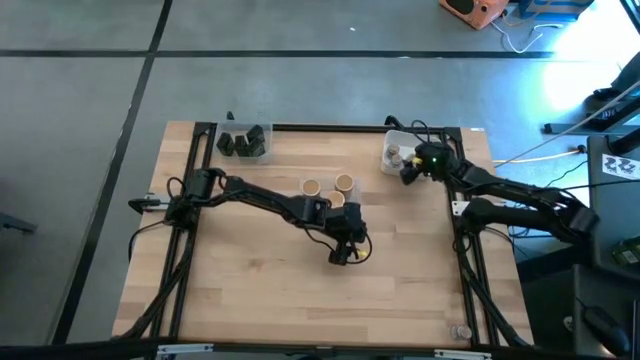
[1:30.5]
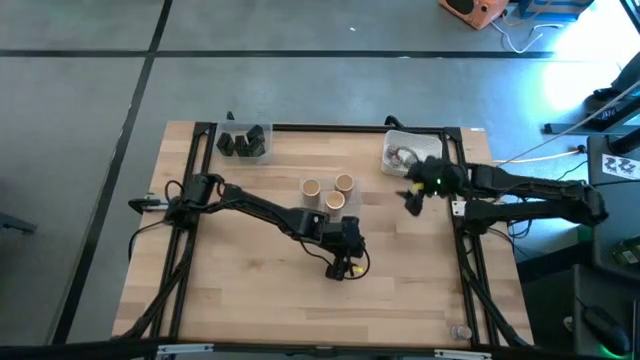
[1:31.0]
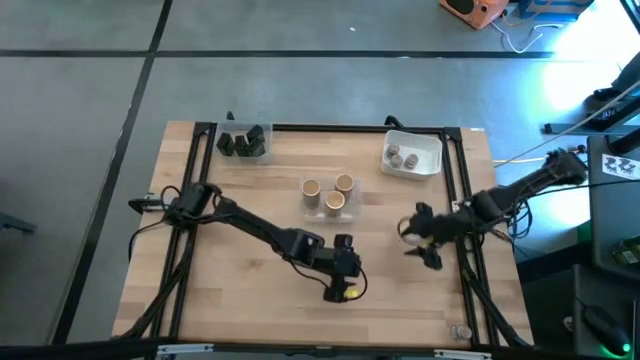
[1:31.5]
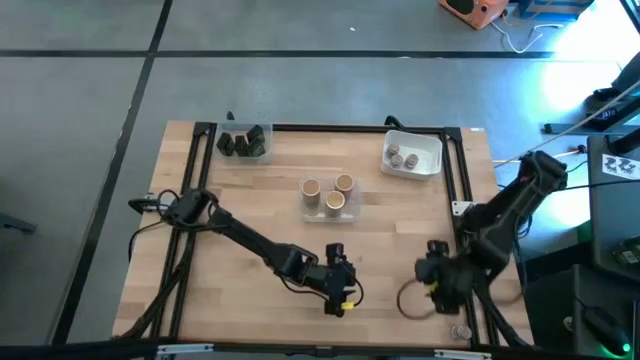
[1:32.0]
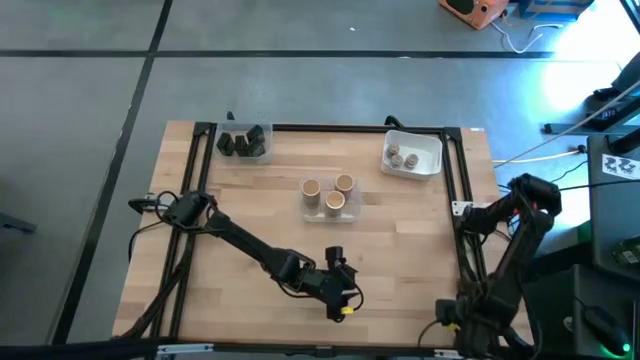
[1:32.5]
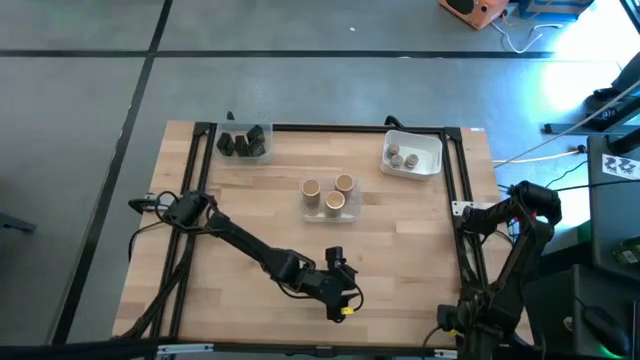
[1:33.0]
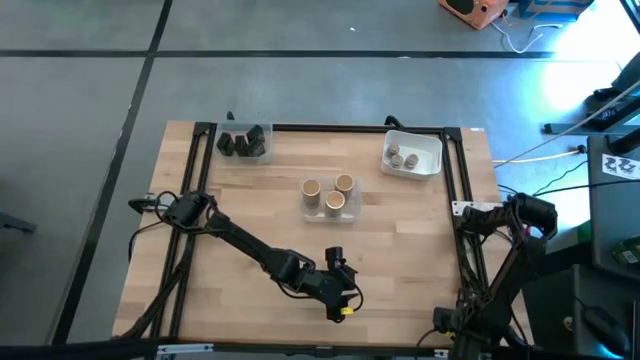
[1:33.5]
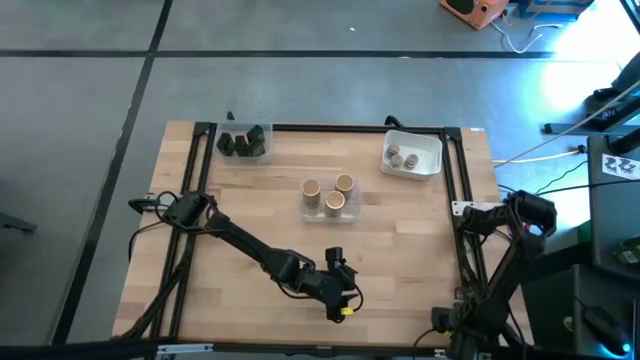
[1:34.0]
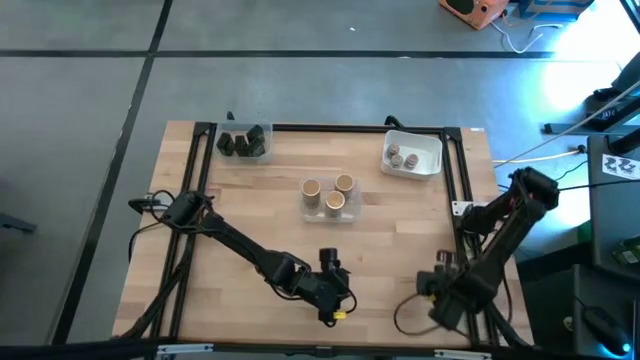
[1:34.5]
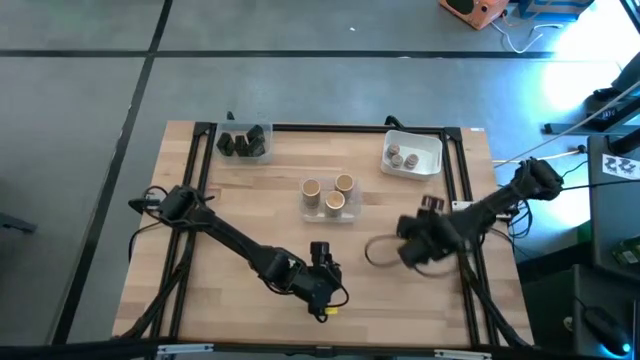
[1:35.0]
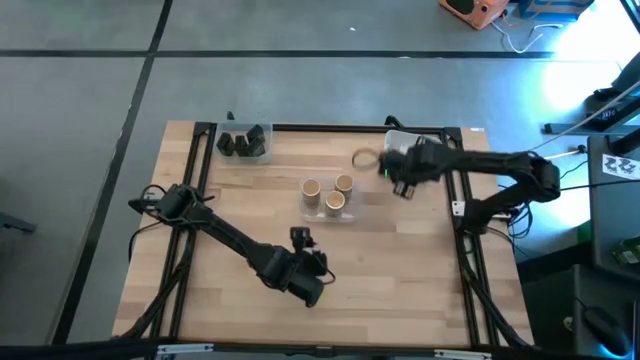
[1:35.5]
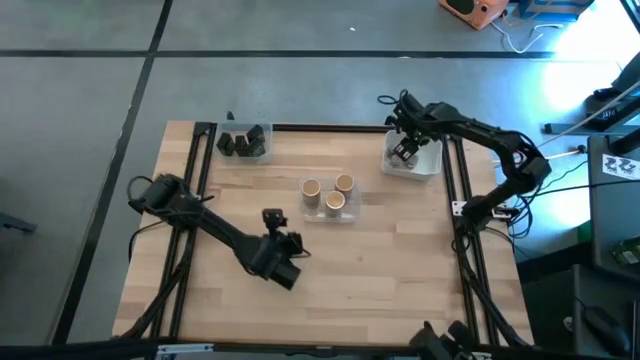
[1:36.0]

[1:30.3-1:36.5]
Task: Sort spices by type
Put the brown seasoning bottle into the white bin

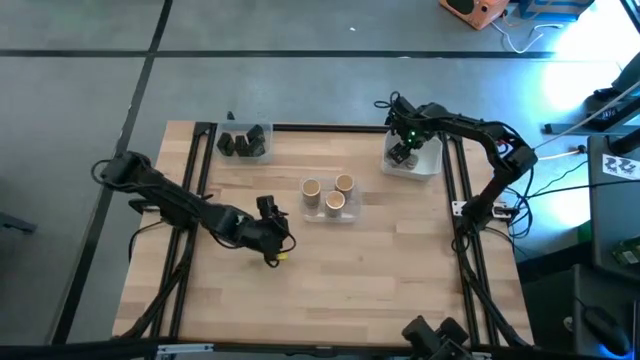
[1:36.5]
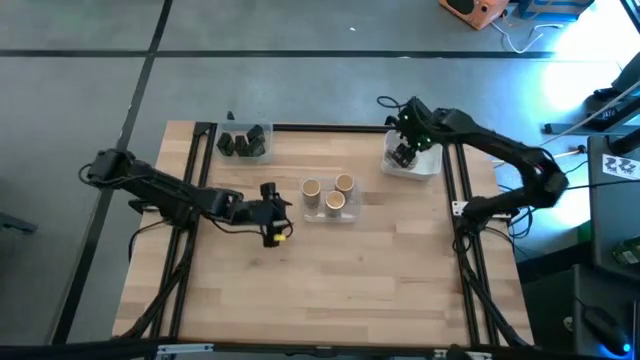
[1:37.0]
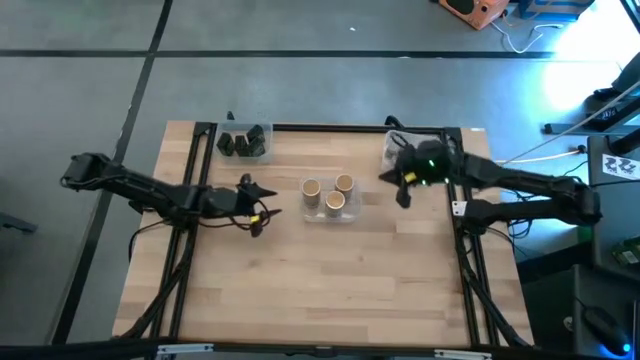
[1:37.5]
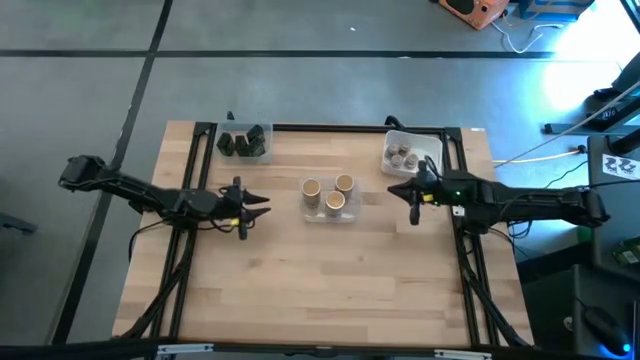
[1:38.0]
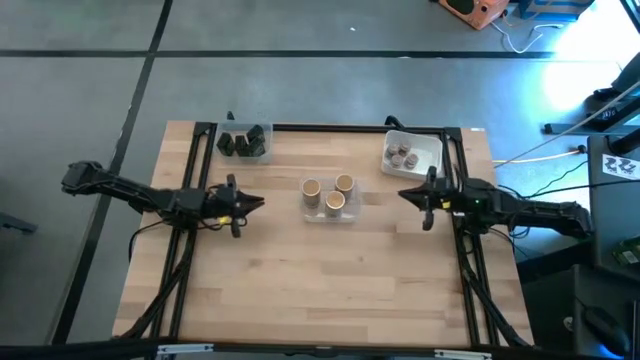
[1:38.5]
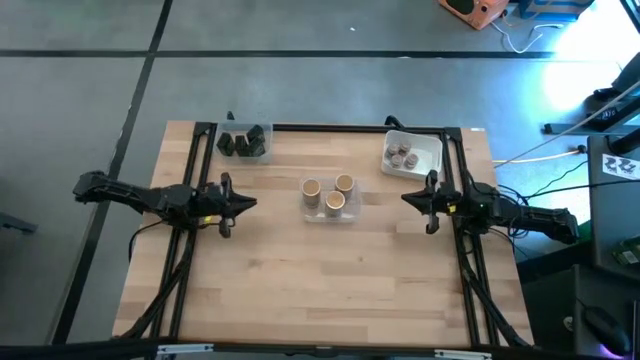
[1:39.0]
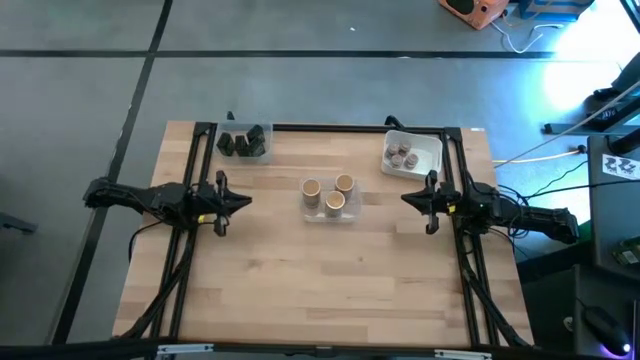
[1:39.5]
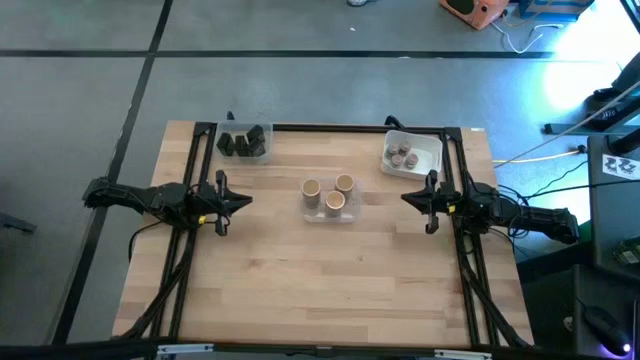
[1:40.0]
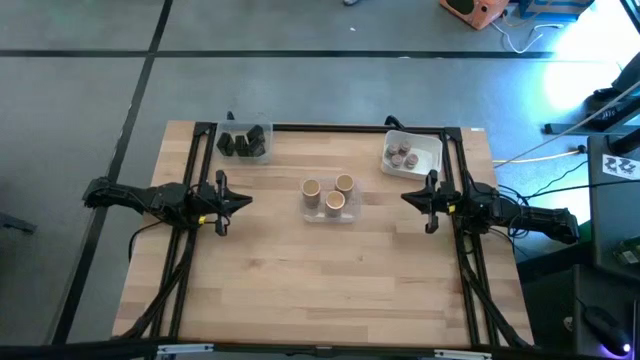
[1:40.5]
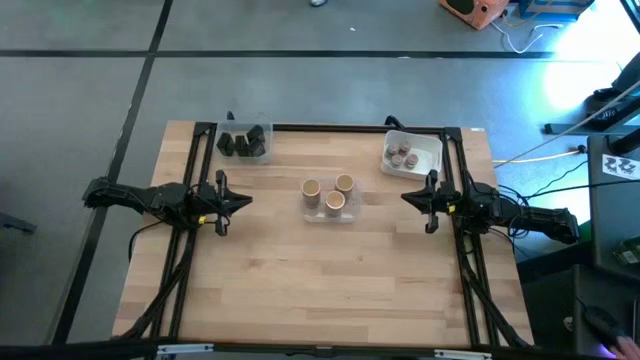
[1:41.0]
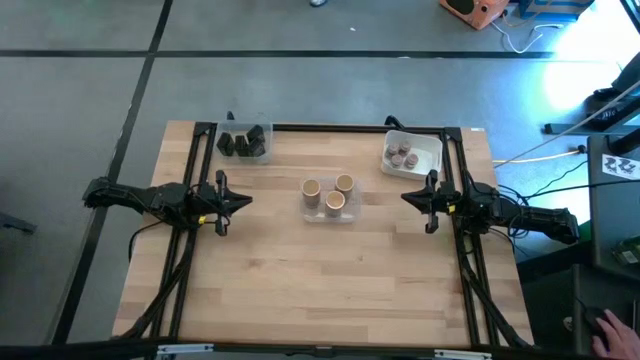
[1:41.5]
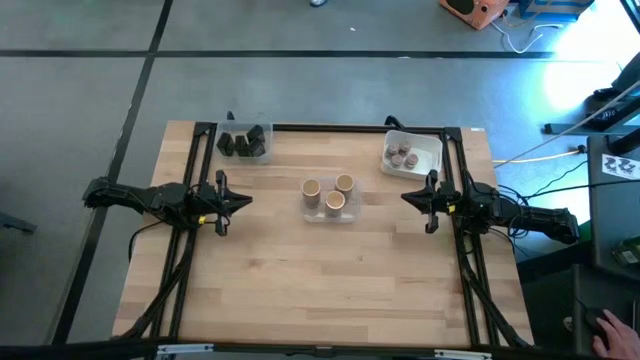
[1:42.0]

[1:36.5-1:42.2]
Return to Home Position

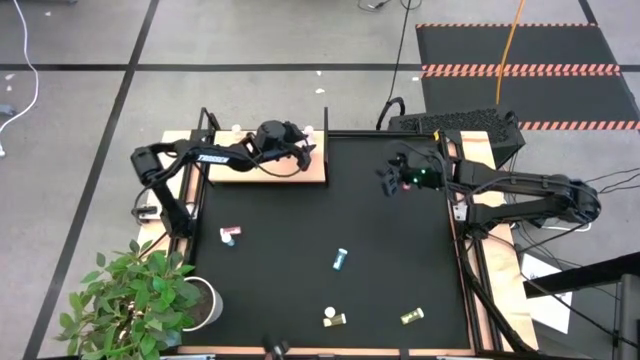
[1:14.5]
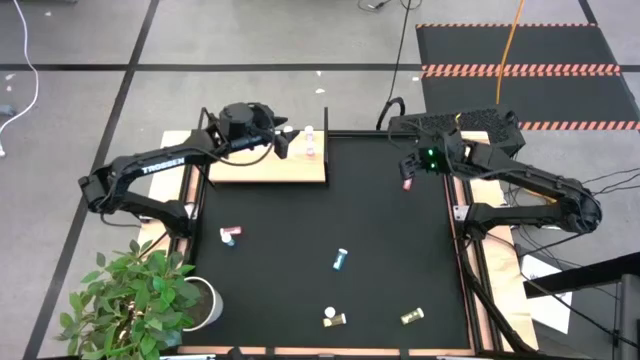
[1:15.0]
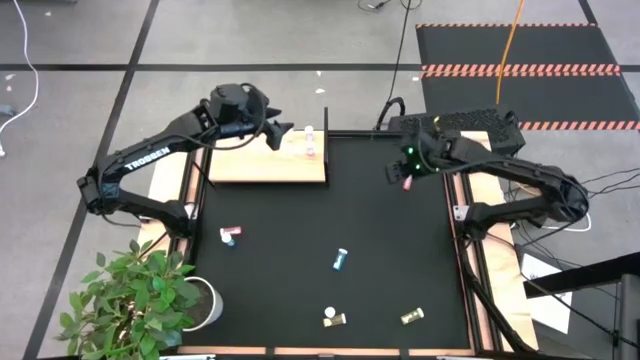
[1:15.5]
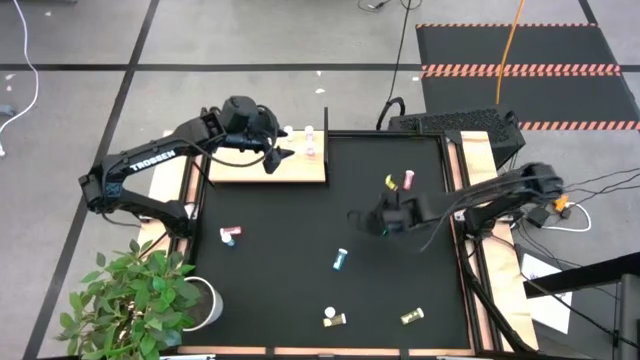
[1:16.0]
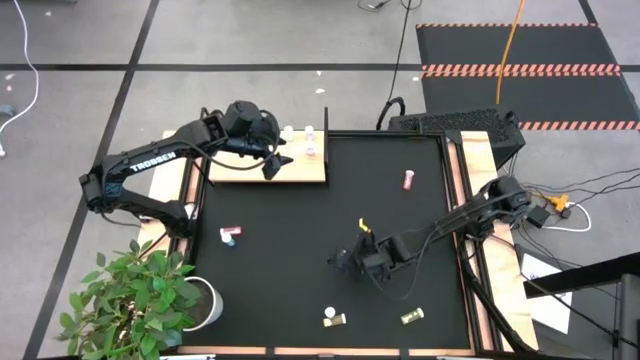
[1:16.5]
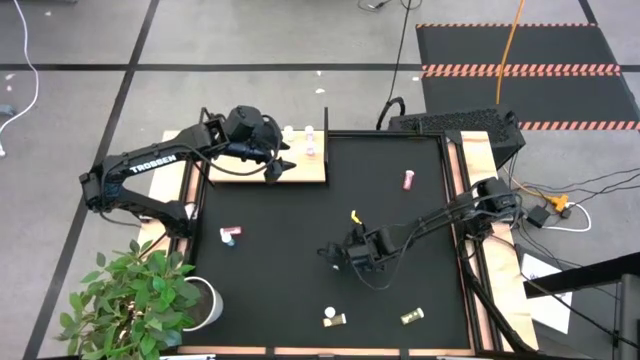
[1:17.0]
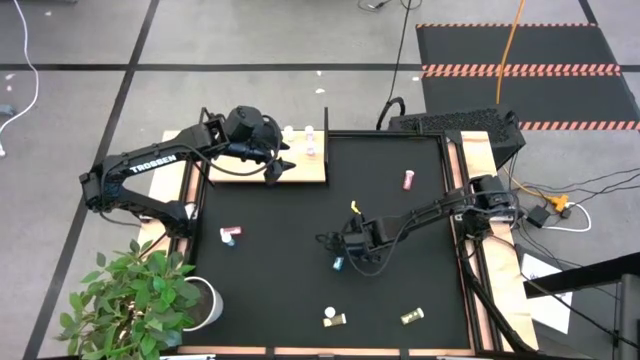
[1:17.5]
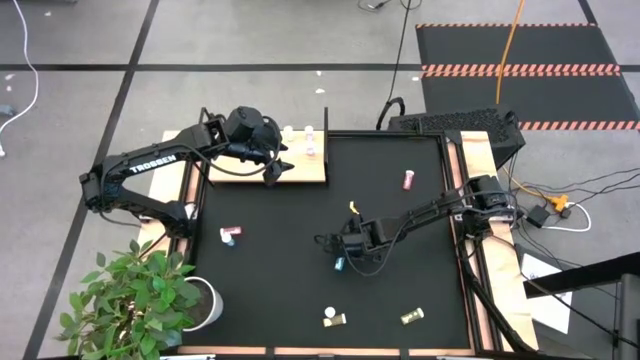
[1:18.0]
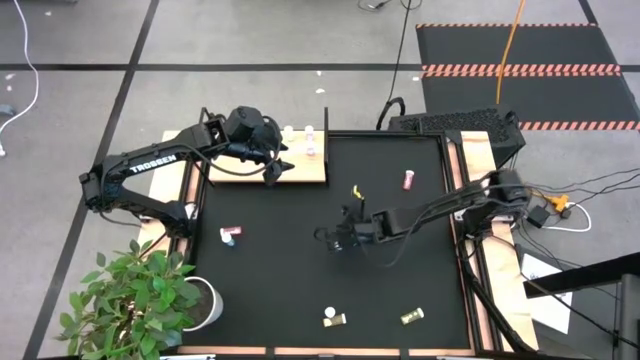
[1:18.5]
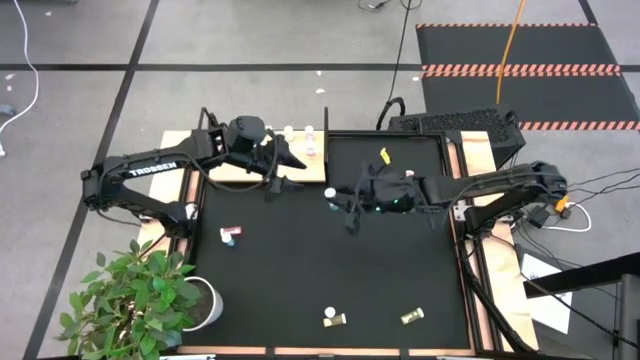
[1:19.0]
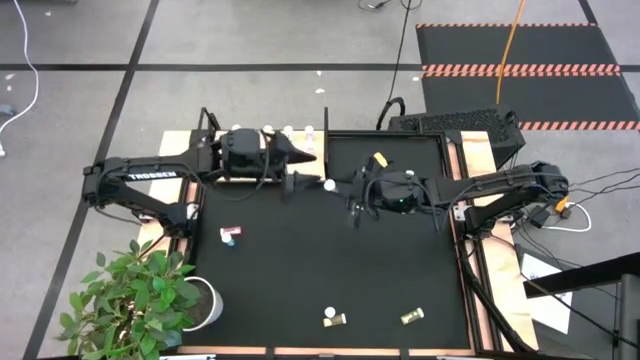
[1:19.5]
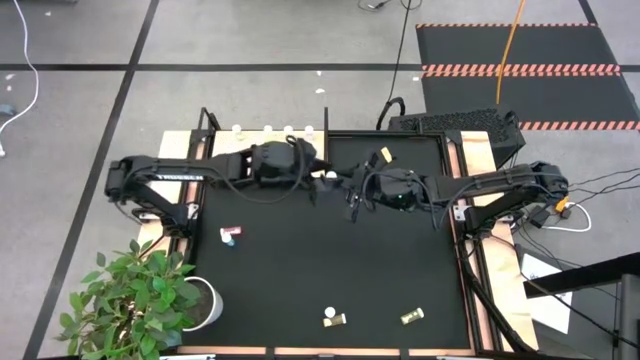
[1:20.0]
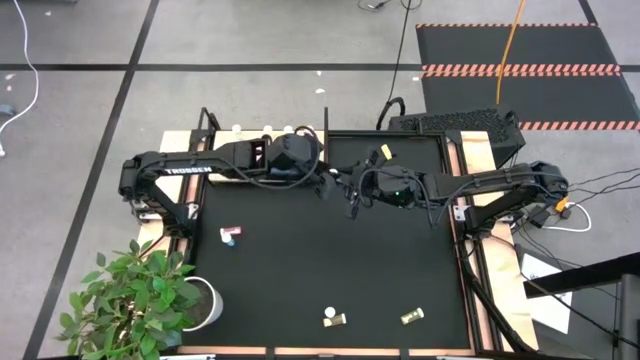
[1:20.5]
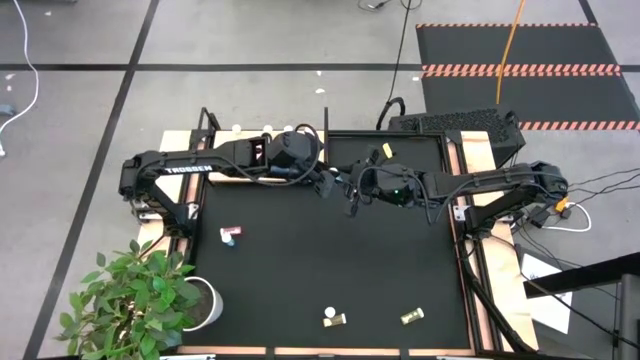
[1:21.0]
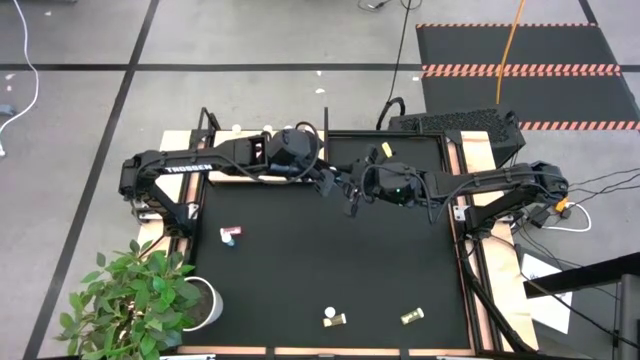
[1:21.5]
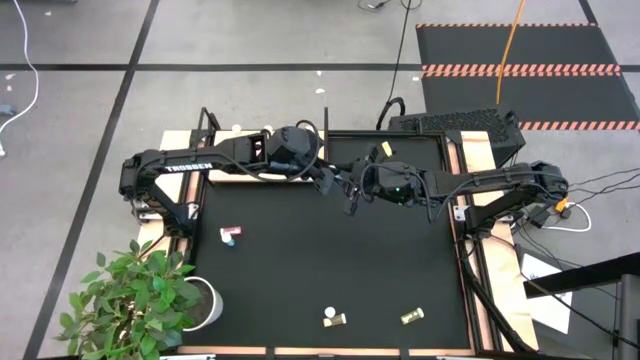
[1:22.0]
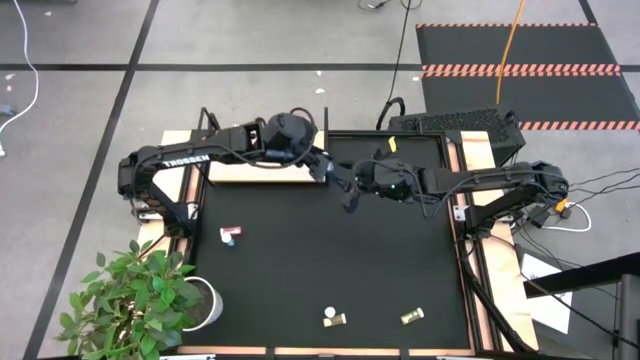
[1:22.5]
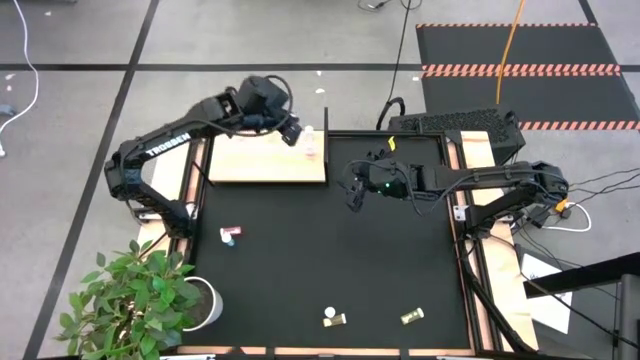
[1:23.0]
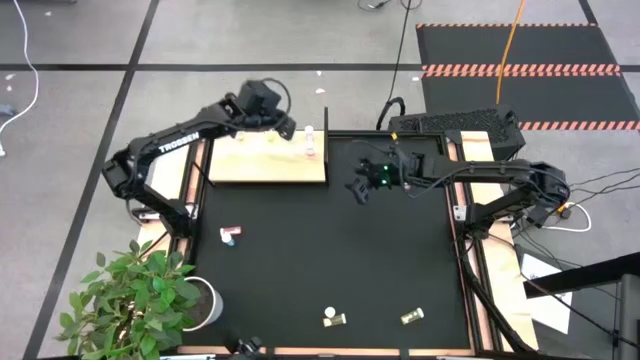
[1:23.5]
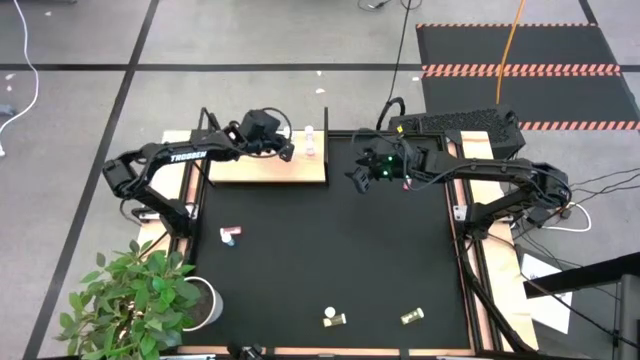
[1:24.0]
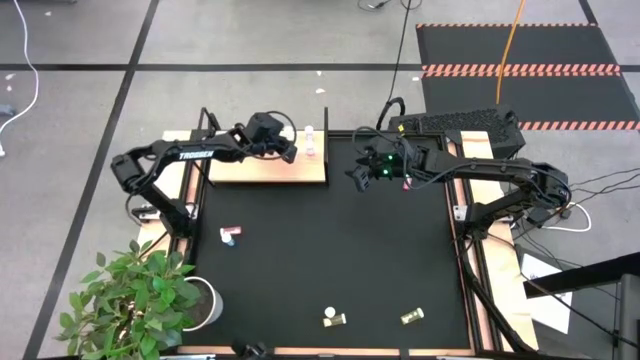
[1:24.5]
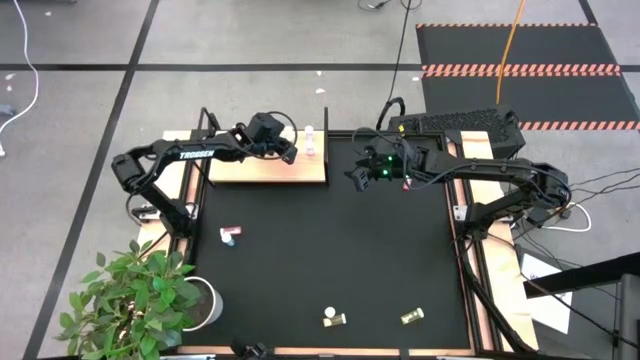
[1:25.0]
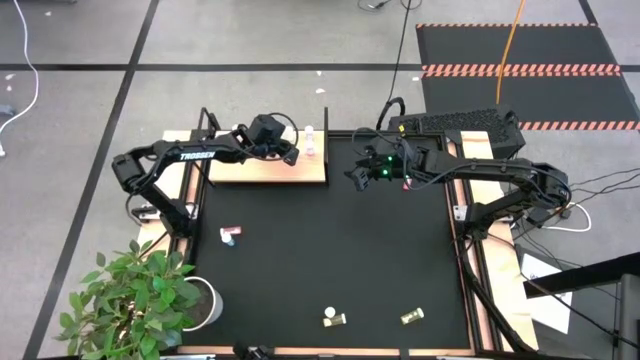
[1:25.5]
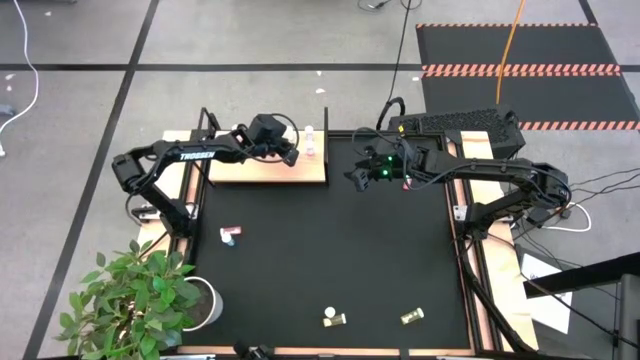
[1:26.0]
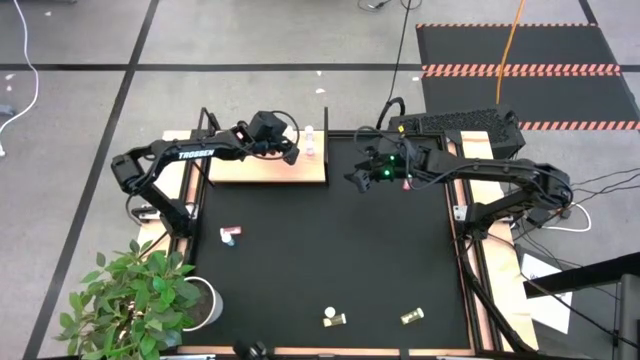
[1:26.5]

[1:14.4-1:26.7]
Task: Pick and place medicine bottles onto shelf by color
Put the right blue pill bottle on the shelf aligned with the other blue pill bottle
